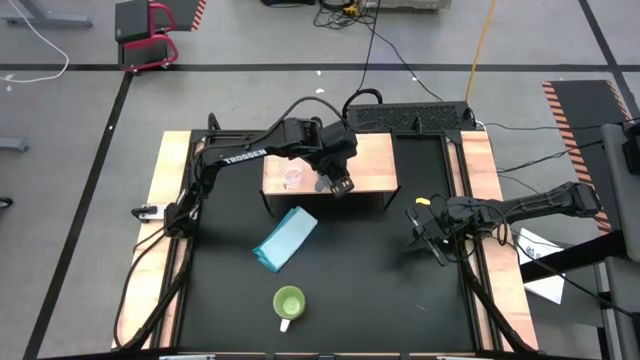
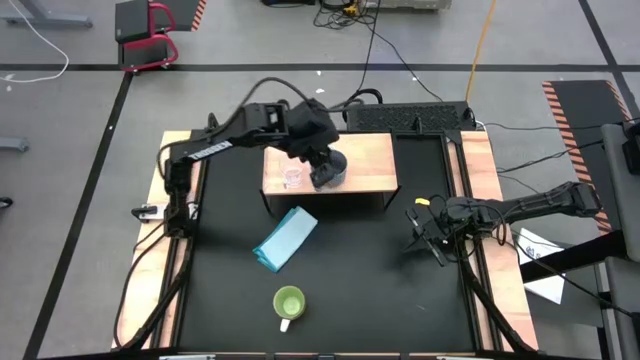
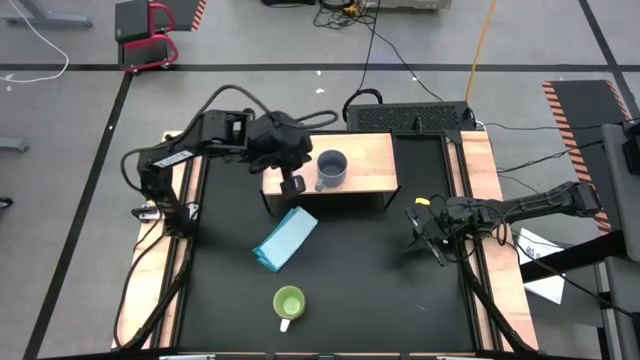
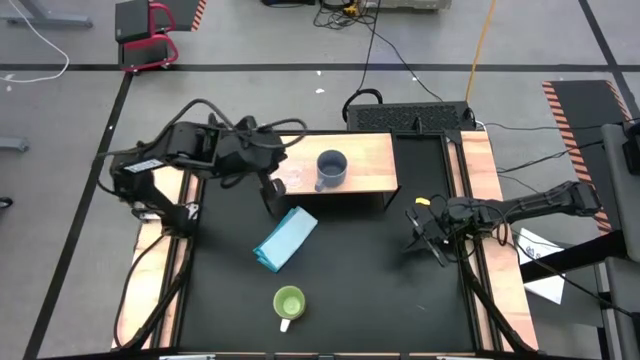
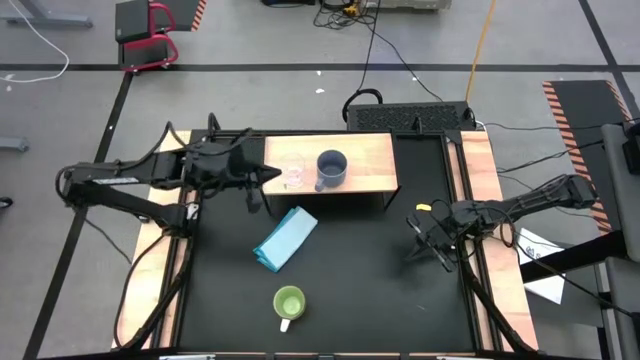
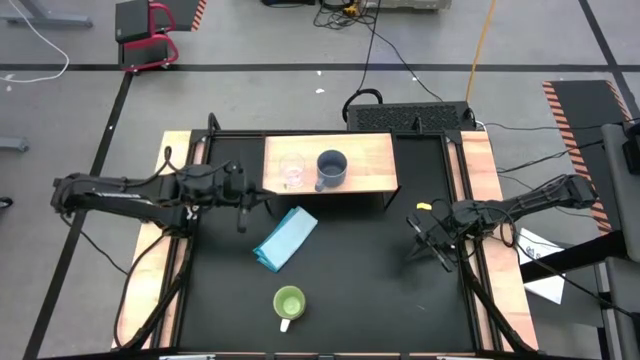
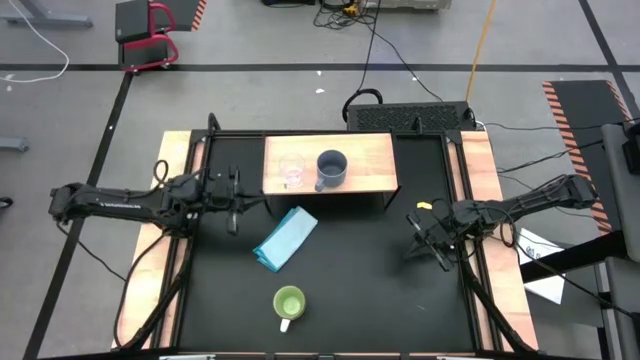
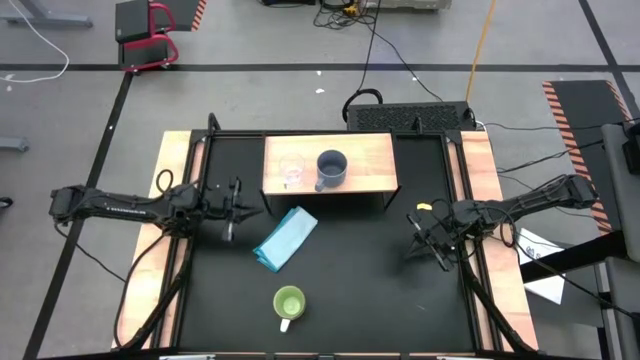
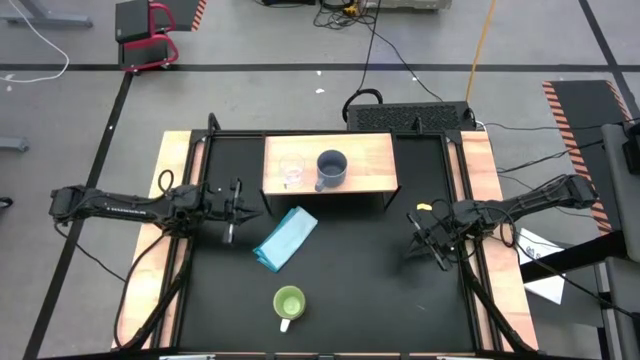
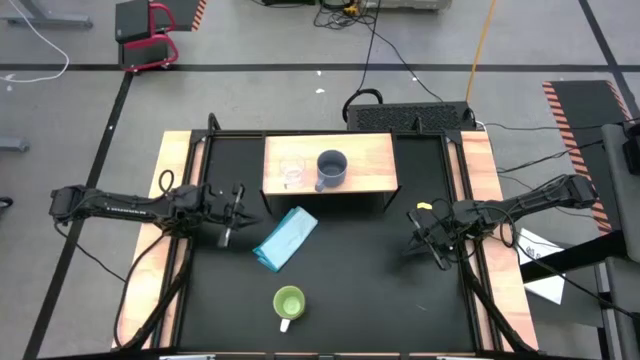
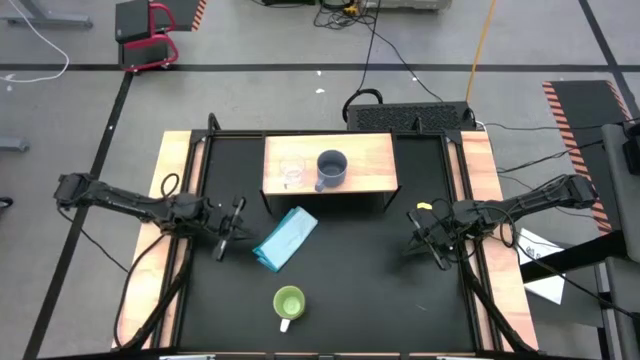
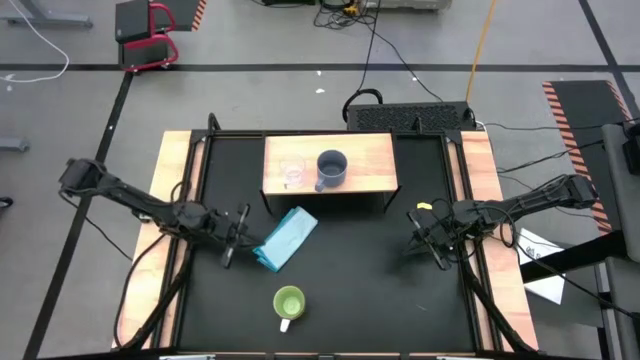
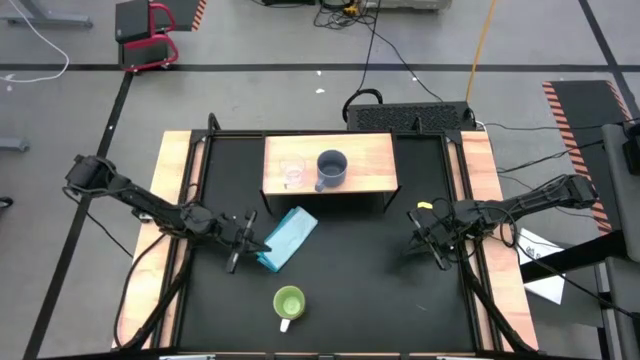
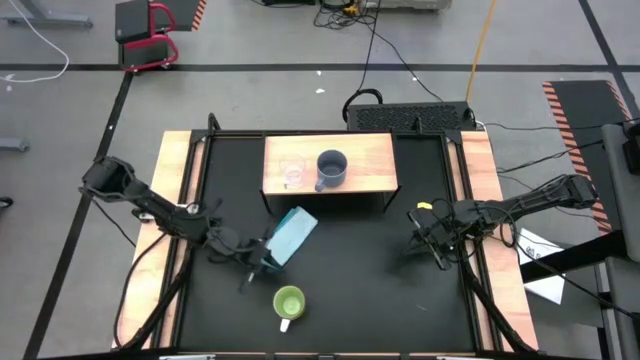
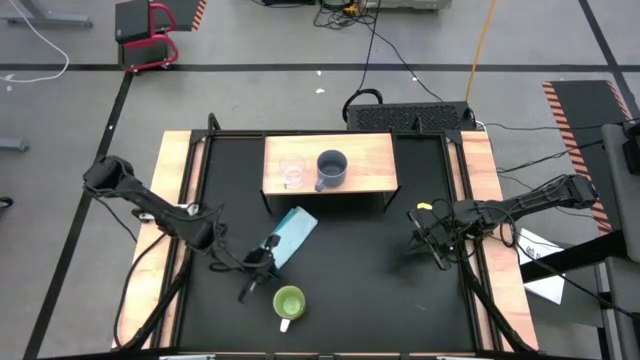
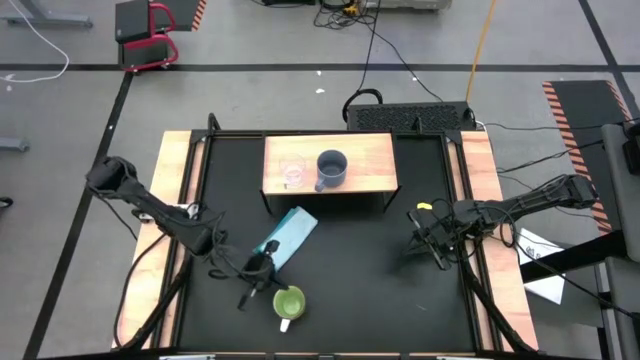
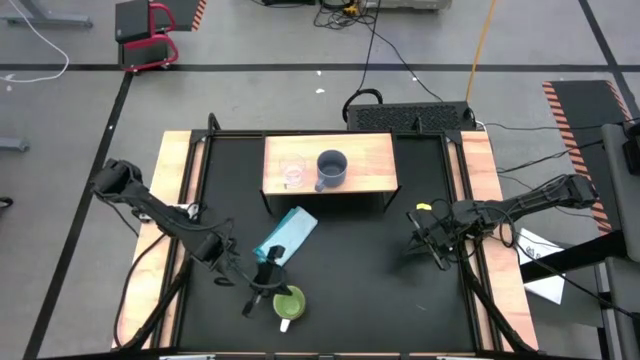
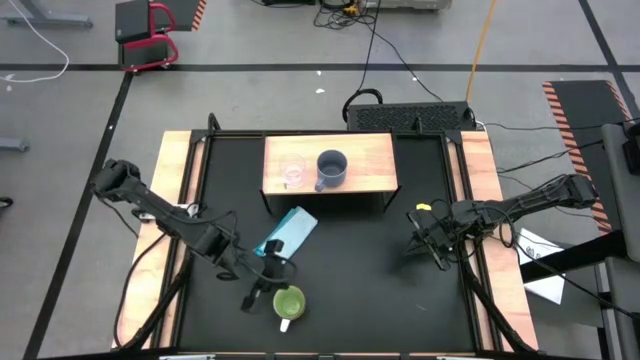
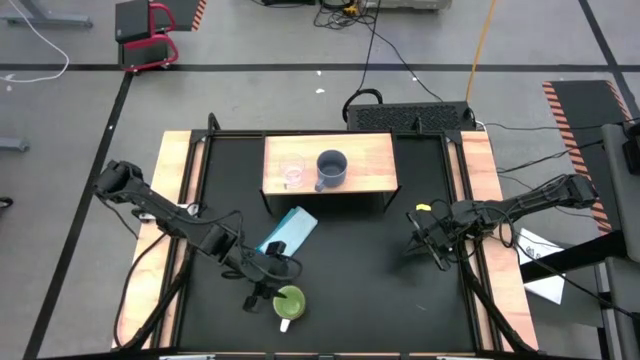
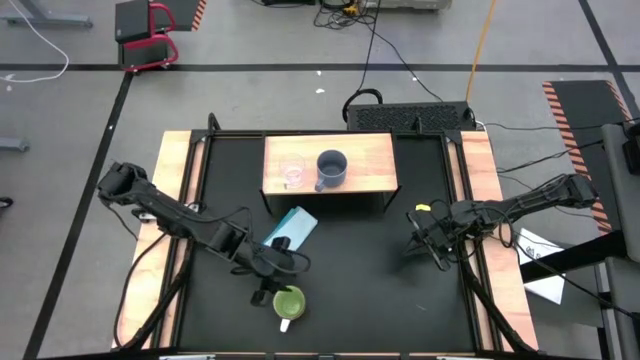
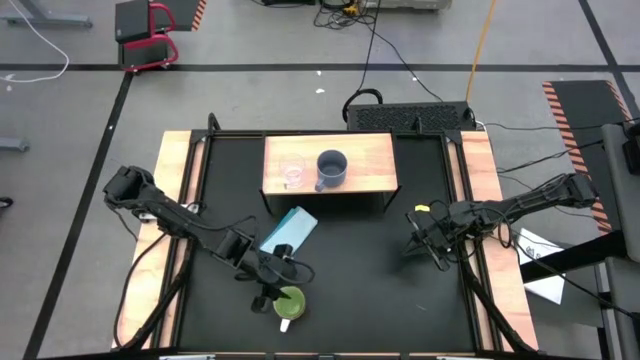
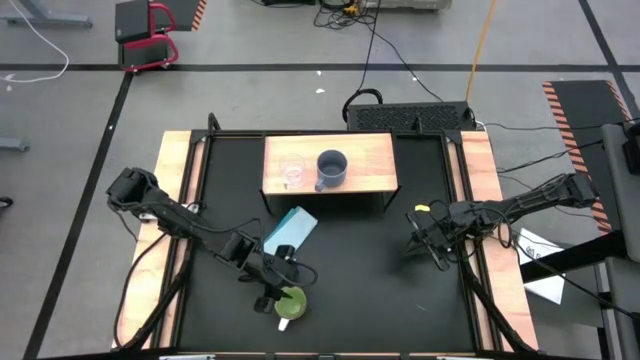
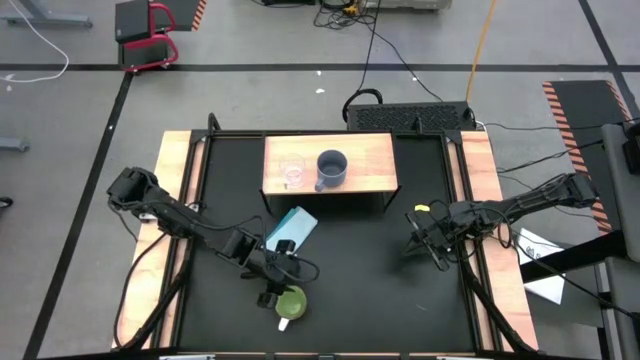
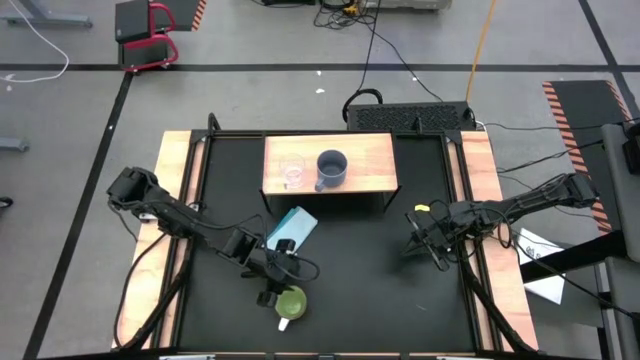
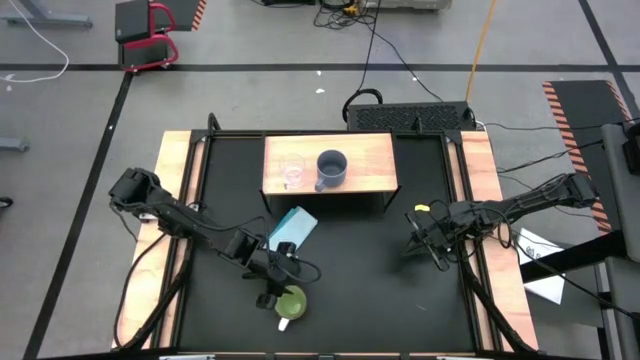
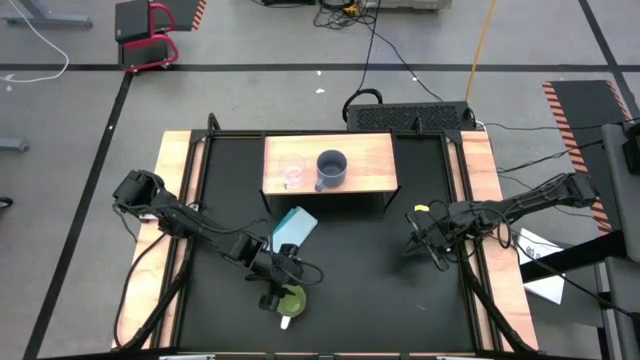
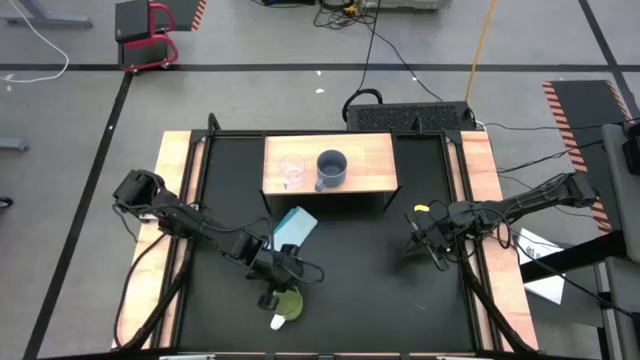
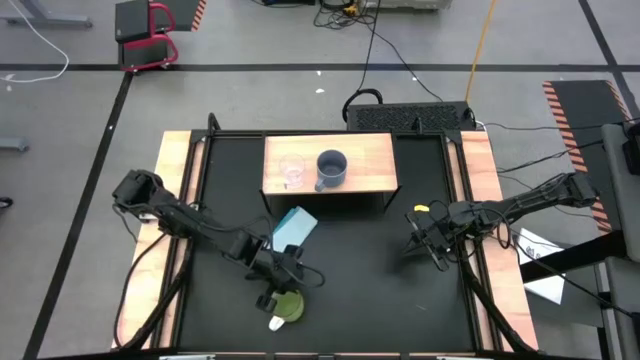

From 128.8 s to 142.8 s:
Task: Stack small to large cups/mugs on shelf
Put the green mug on the shelf

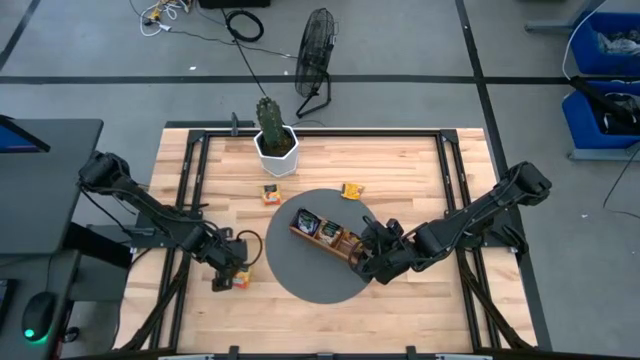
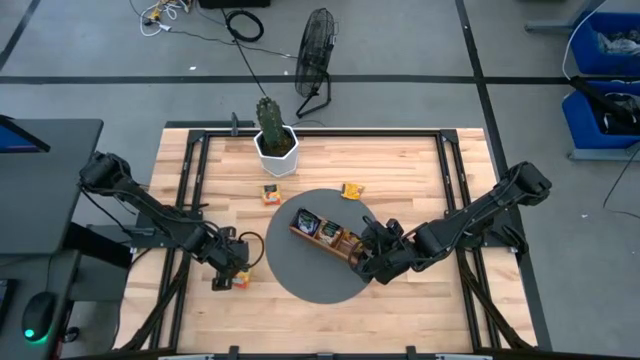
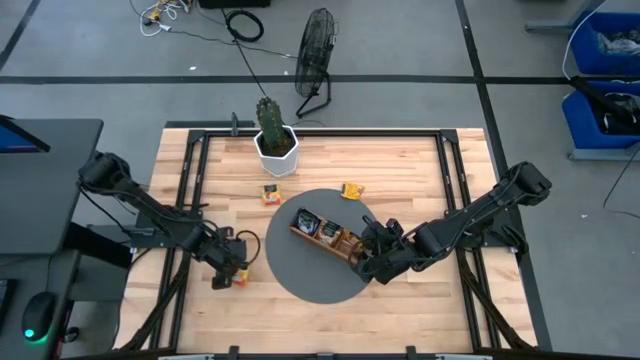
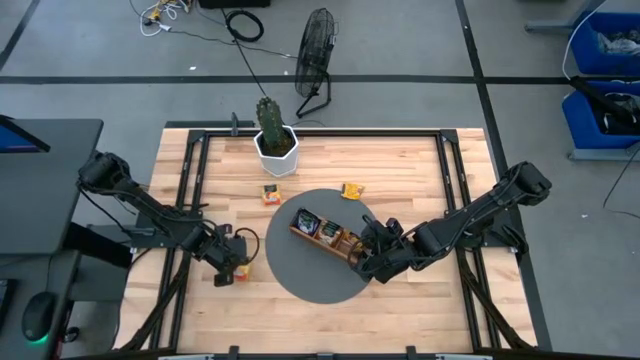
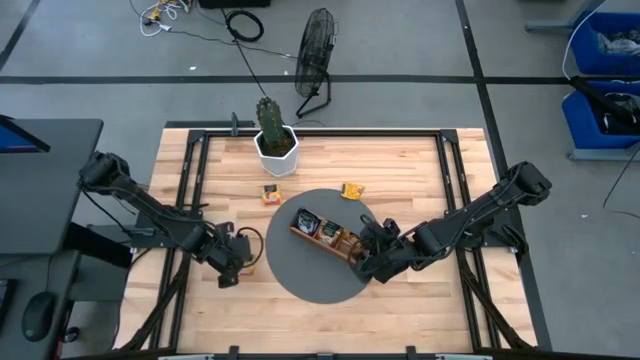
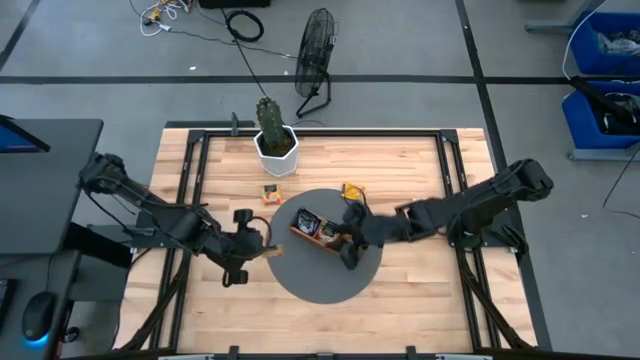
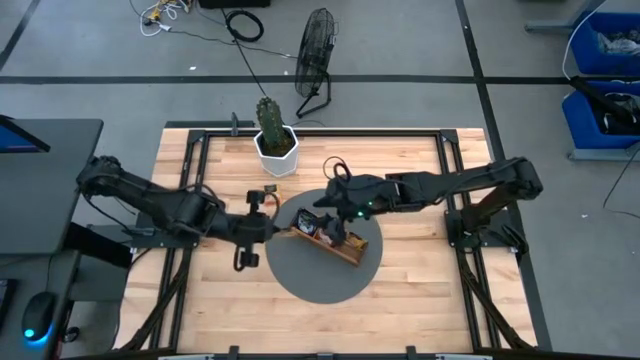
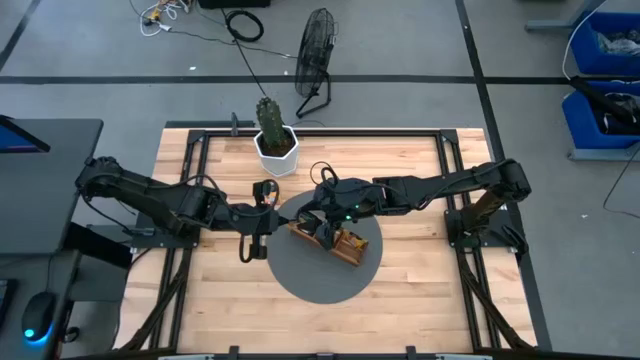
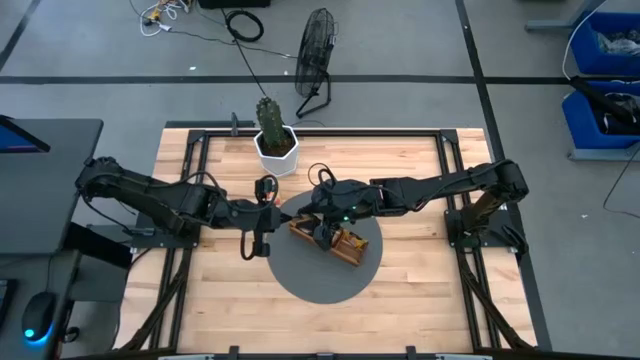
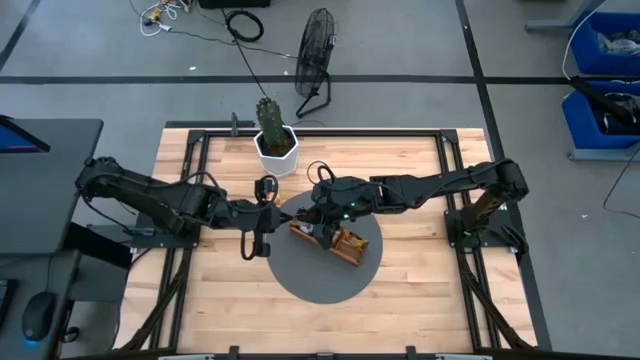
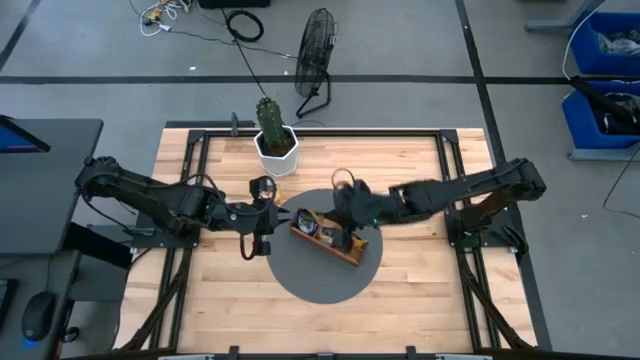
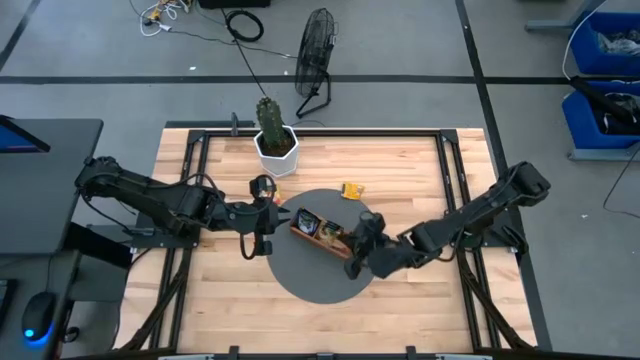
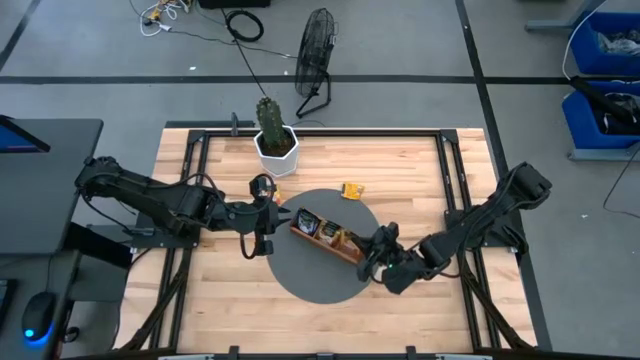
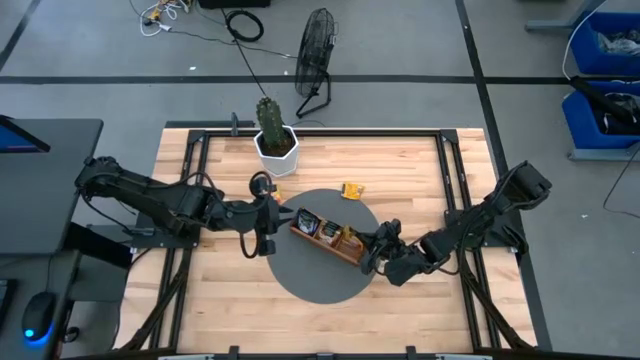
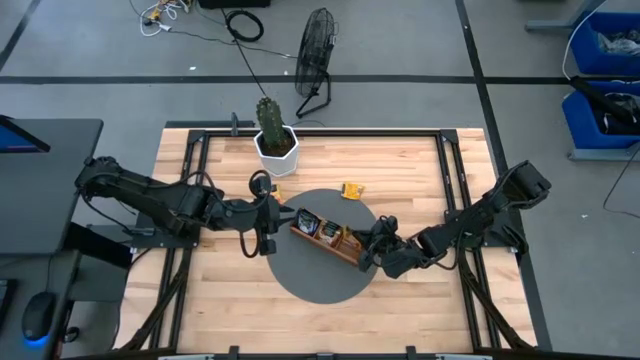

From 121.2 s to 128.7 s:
Task: Pick & Place Tea
Put the orange tea bag into the right section of the wooden organizer
